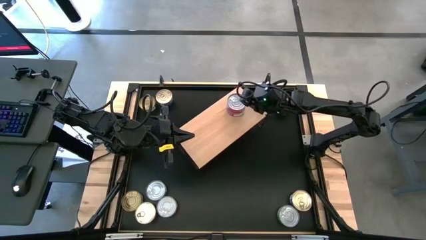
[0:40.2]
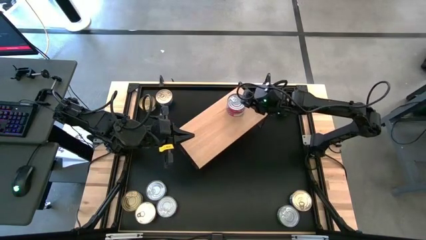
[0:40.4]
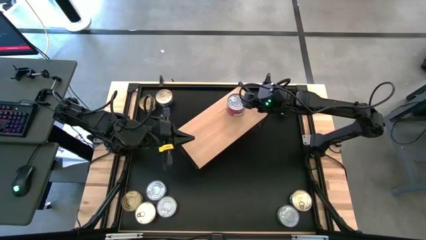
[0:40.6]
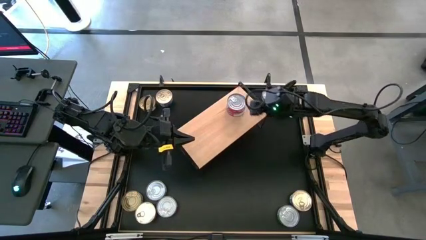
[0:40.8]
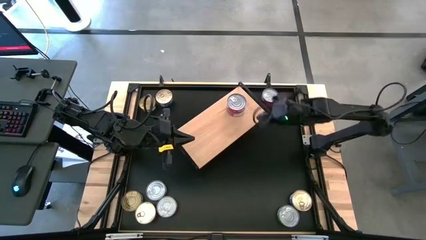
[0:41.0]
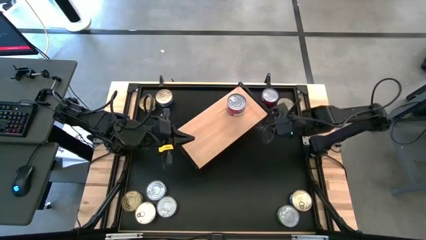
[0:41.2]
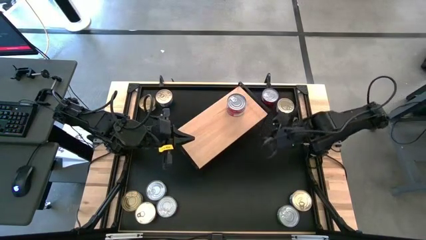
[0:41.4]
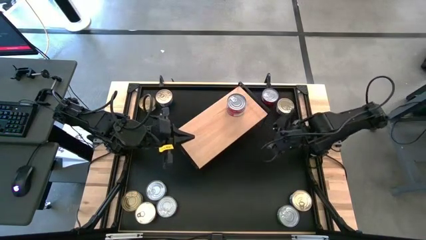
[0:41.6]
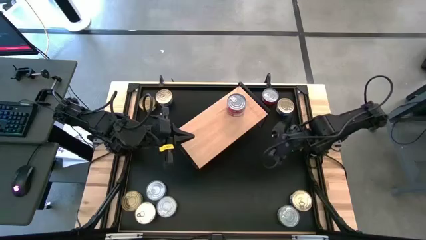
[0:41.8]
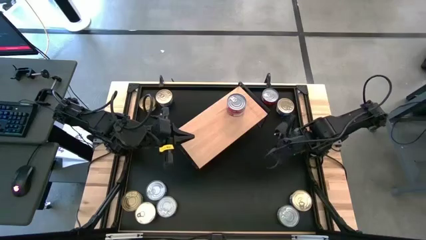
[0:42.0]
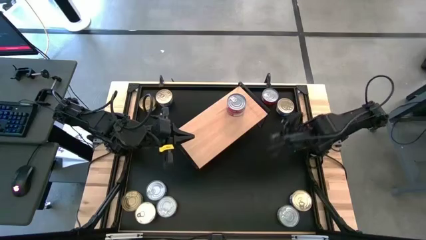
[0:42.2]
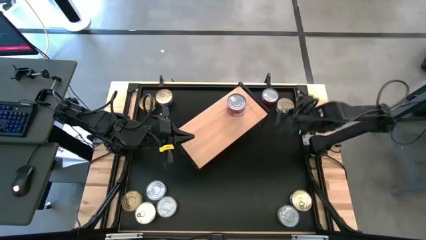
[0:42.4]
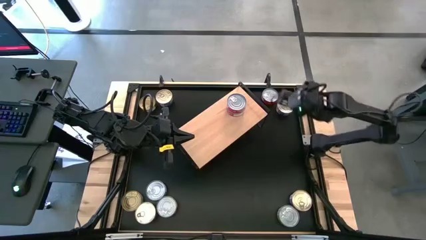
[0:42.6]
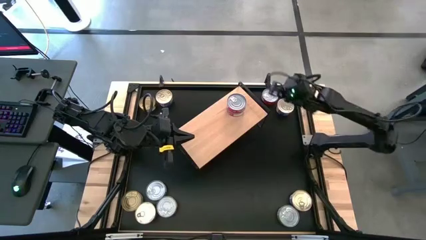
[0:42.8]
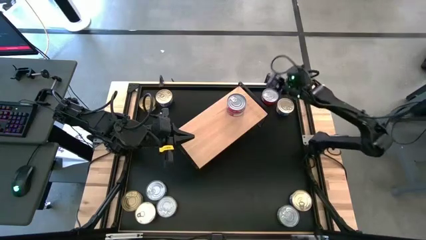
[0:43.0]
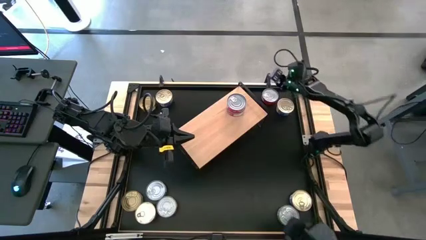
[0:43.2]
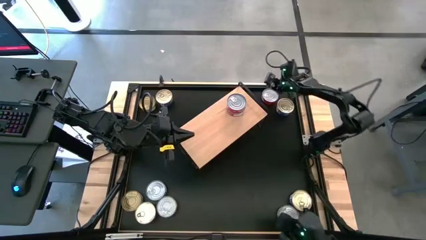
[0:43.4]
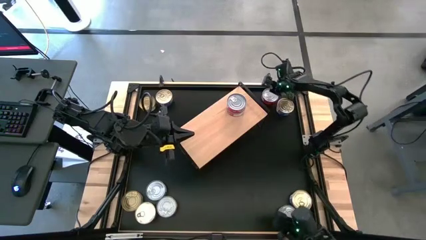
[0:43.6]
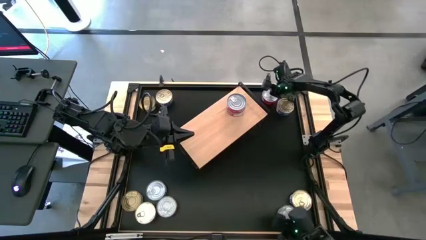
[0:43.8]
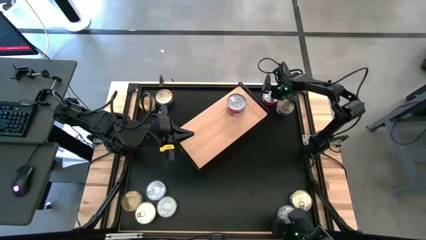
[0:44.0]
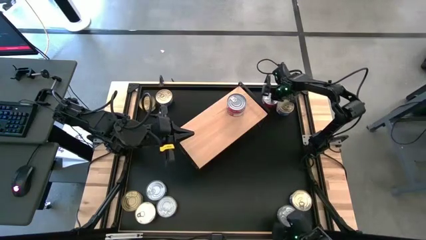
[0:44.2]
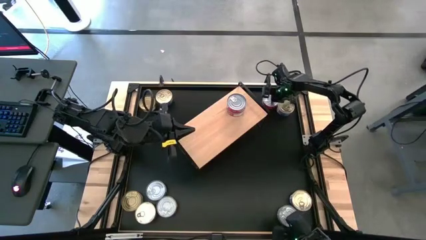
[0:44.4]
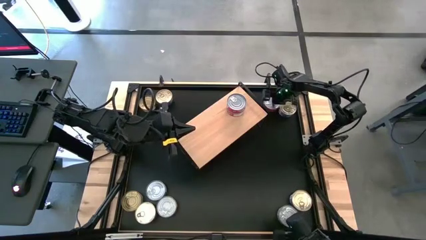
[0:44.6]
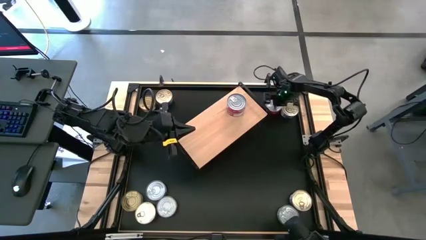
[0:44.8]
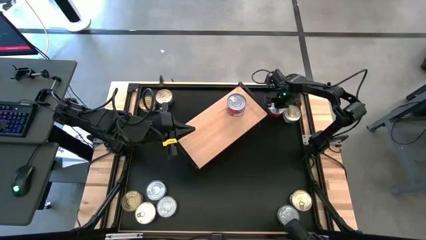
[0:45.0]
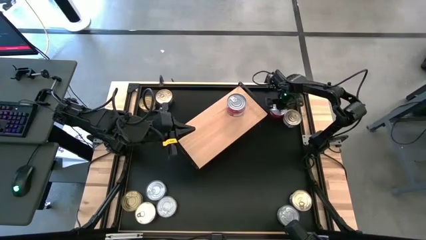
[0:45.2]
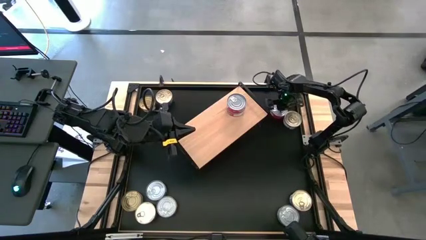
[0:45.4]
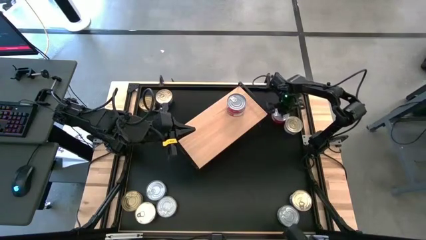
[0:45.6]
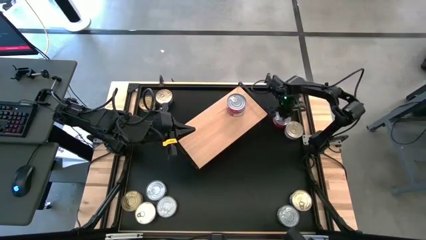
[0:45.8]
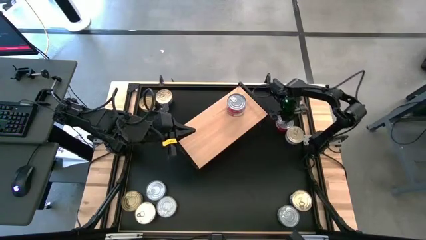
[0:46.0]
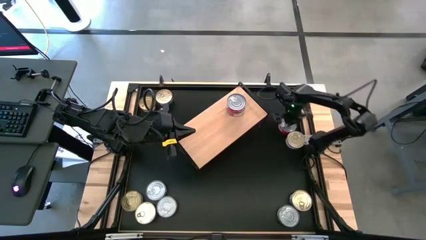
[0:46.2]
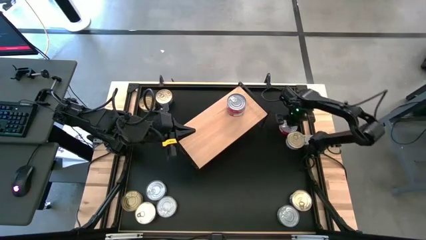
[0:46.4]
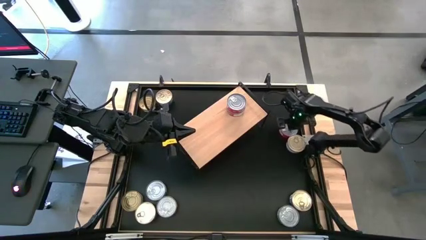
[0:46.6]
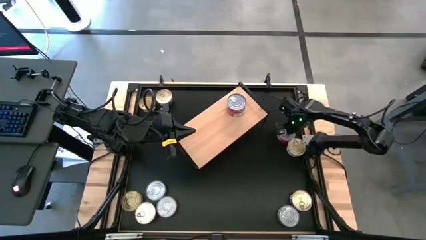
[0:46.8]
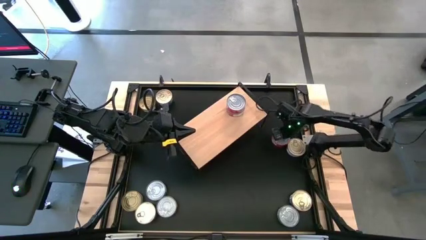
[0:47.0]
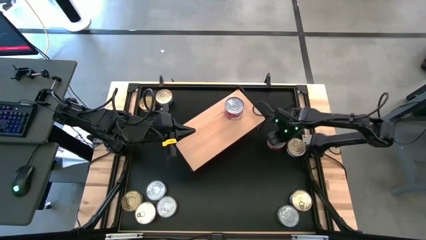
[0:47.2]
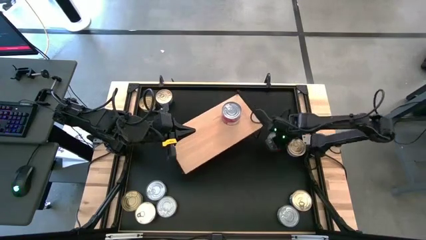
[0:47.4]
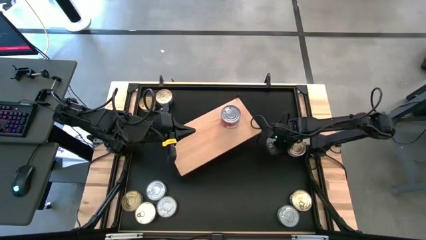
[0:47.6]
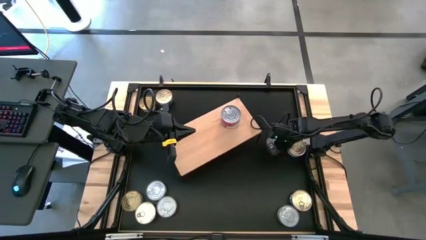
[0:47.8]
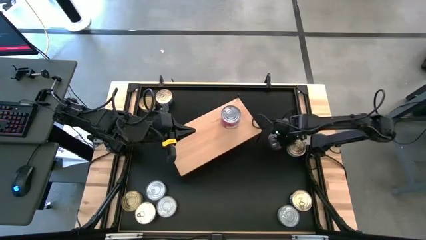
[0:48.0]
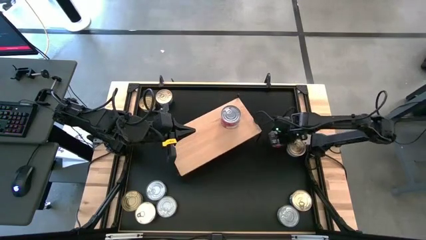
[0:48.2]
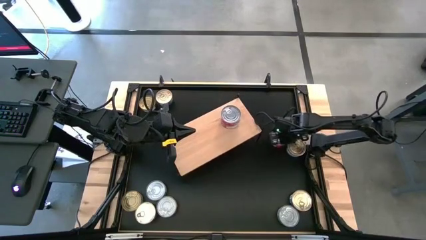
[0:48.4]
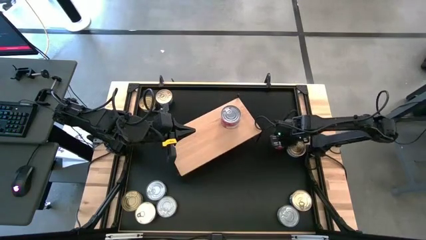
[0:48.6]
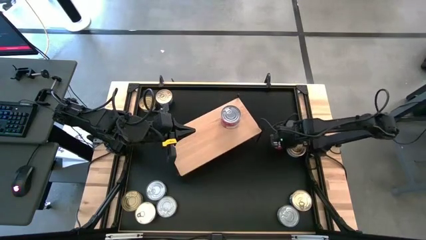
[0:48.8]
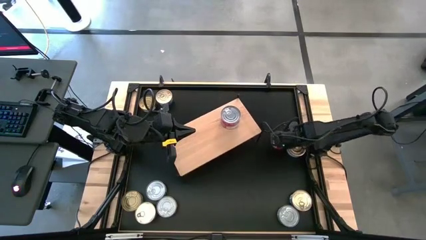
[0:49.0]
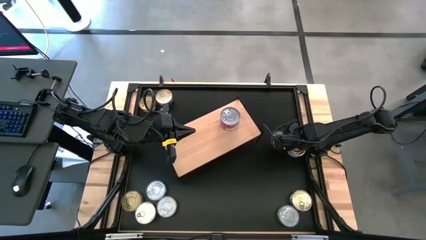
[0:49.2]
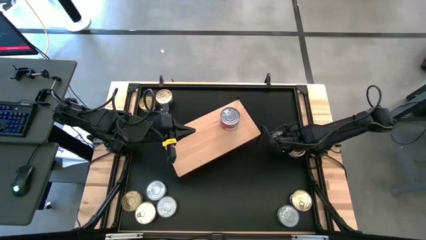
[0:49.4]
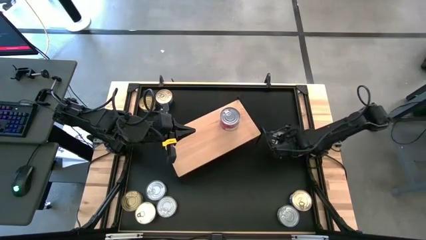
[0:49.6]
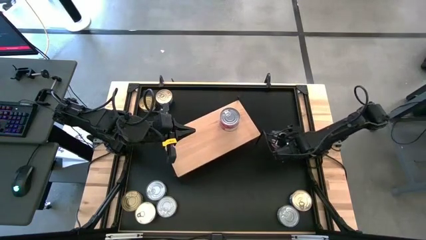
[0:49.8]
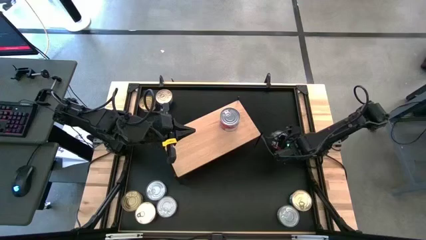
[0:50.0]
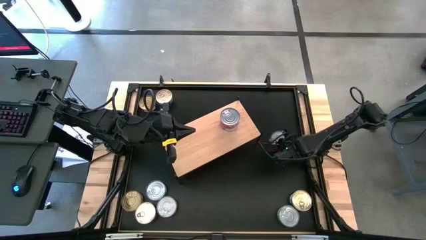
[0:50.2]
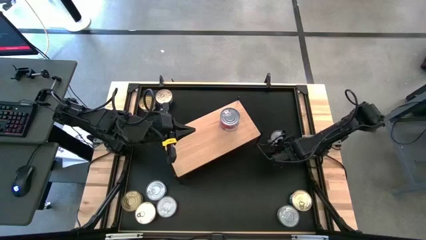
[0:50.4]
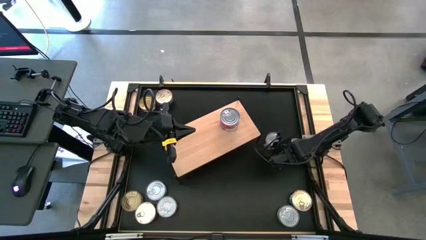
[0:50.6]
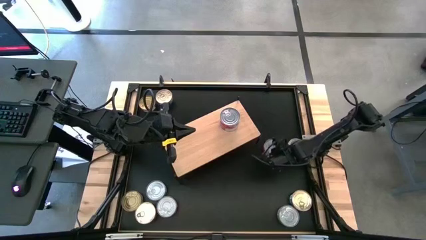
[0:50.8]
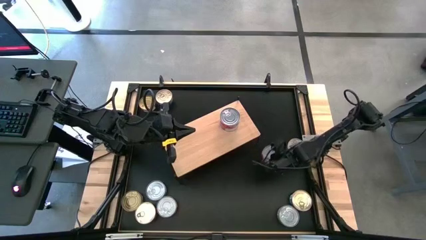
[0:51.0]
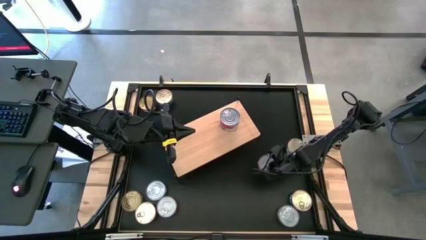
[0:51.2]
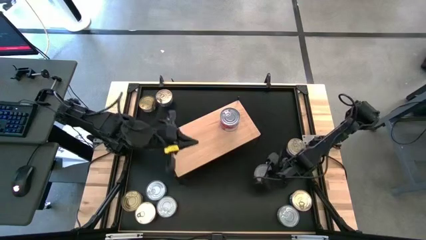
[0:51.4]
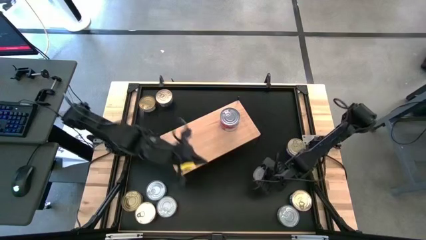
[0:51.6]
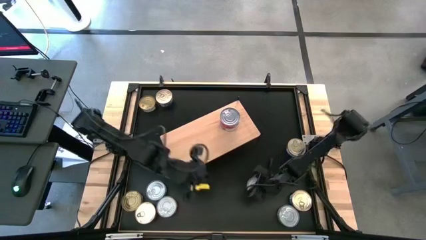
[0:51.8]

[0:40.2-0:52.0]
Task: Stack canned seafood by type on shelf
Stack the red tuna can on the top of the other red tuna cans on the shelf

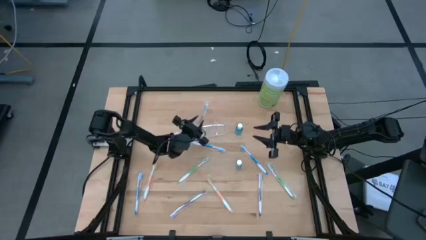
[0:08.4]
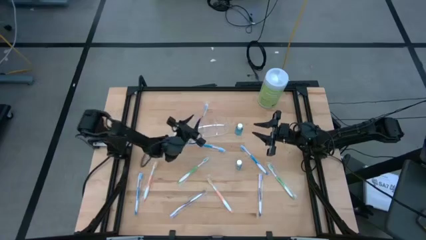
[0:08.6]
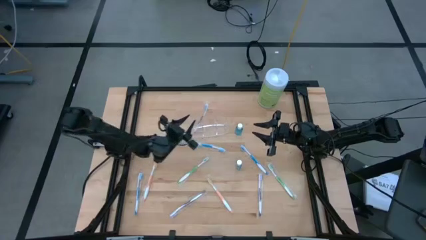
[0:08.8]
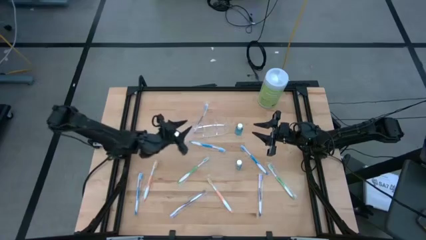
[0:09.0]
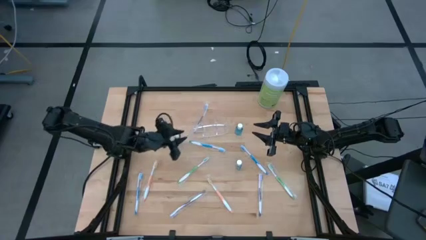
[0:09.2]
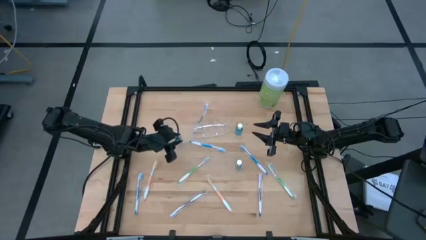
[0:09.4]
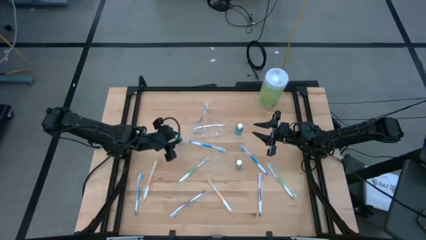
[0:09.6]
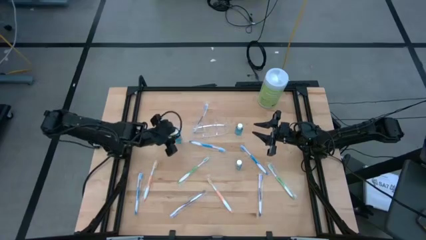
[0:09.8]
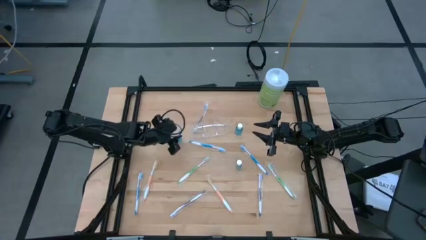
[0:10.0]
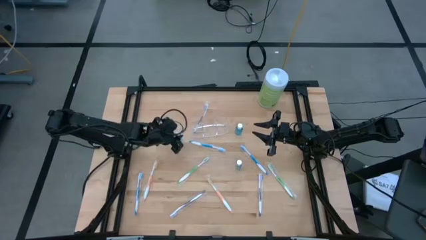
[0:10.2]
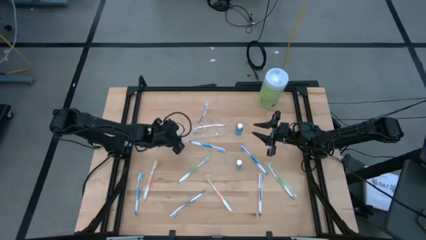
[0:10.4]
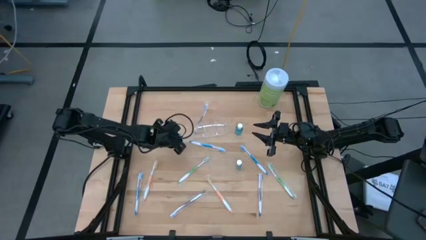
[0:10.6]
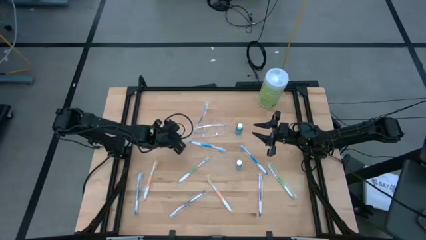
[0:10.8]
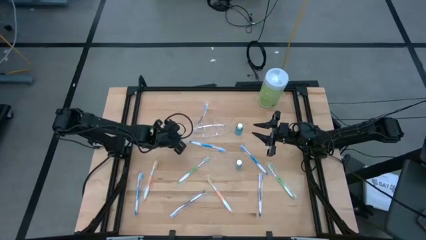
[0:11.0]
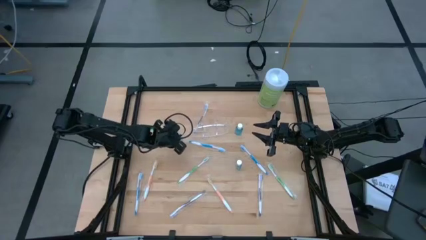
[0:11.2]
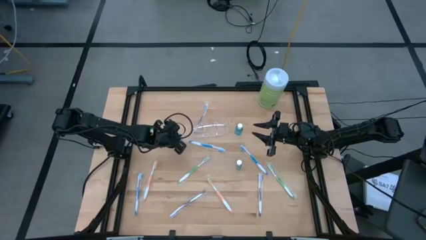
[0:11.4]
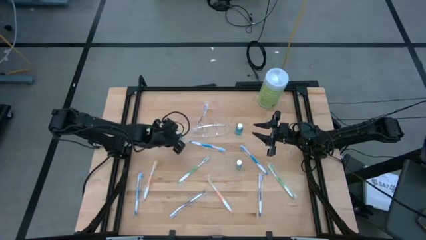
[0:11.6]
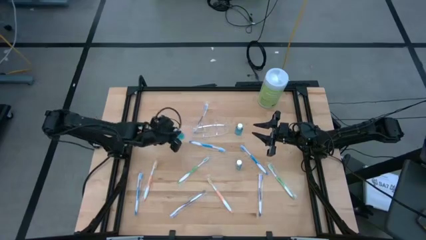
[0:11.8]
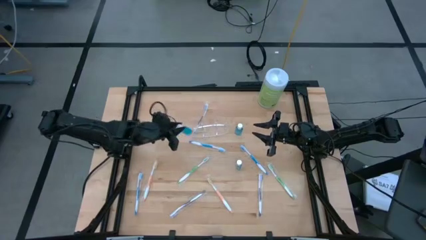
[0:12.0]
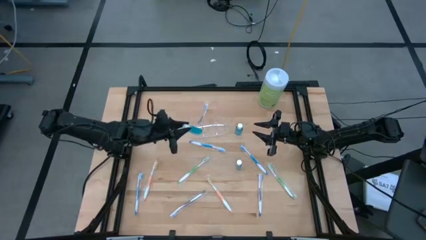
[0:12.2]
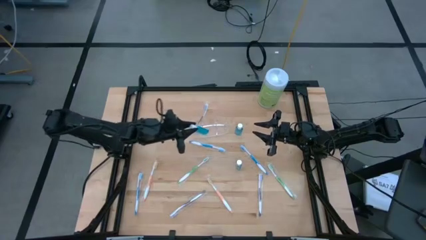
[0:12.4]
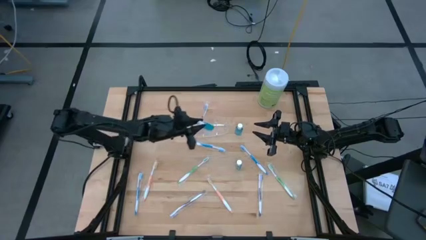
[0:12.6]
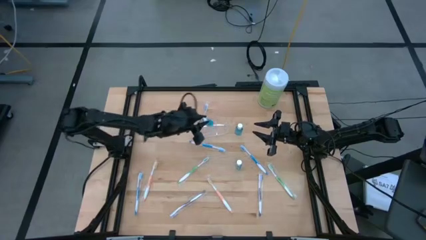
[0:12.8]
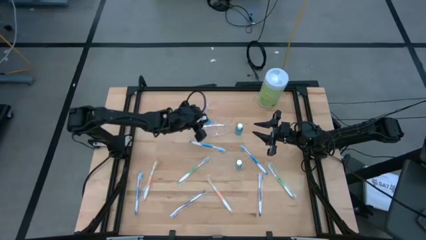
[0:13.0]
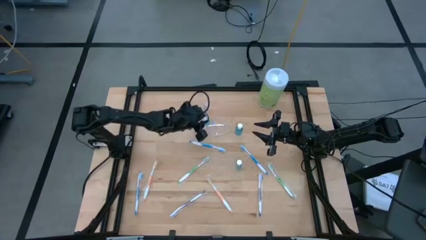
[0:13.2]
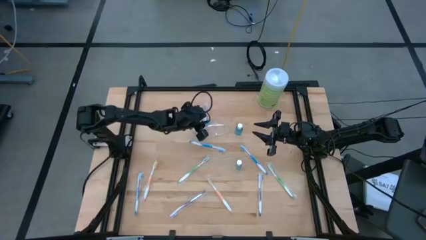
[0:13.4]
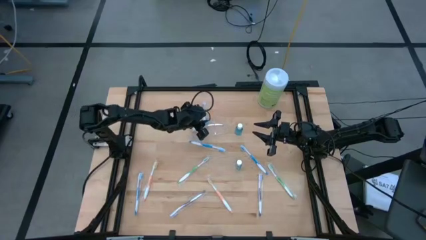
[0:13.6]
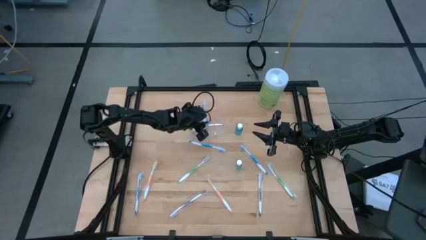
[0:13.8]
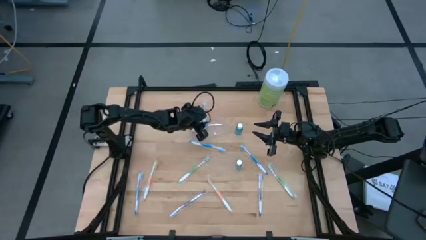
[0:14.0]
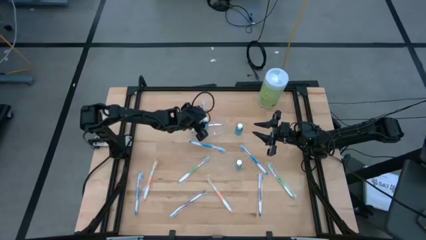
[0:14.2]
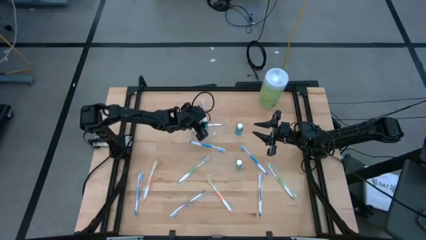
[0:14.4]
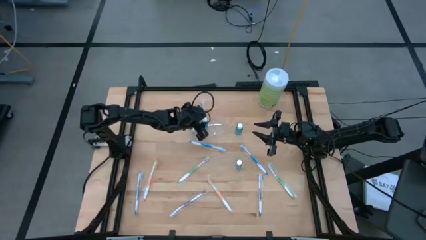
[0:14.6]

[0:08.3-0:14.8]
Task: Pick & Place toothbrushing station
Put the top left mouthwash into the transparent organizer
